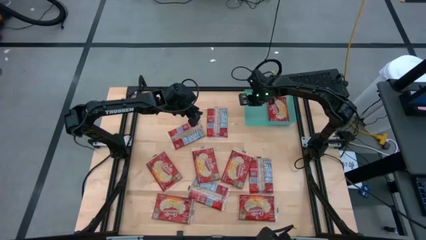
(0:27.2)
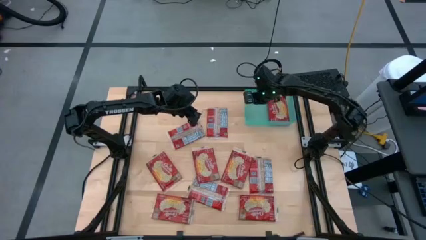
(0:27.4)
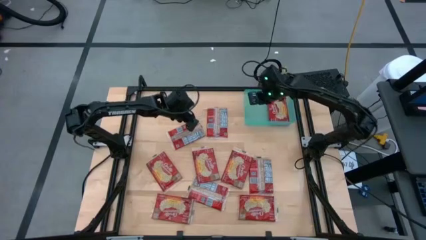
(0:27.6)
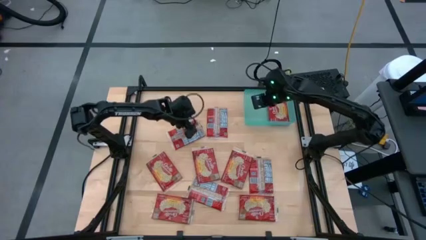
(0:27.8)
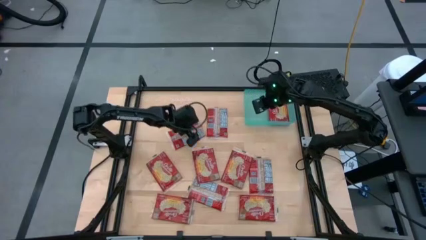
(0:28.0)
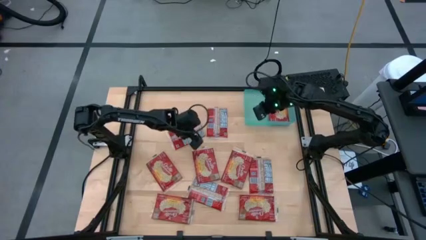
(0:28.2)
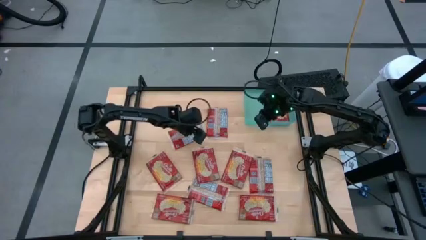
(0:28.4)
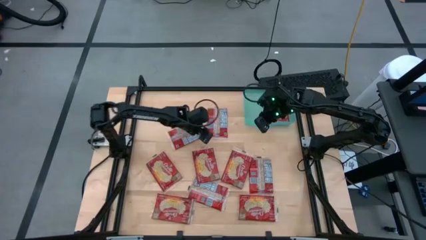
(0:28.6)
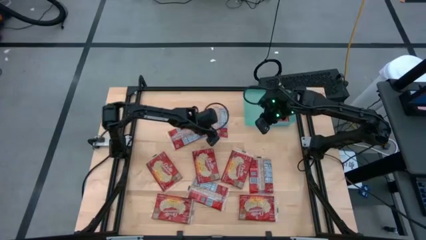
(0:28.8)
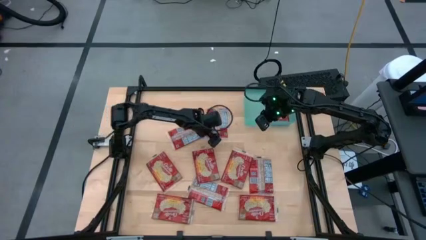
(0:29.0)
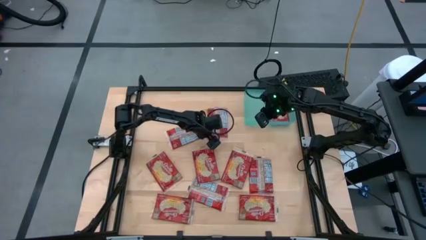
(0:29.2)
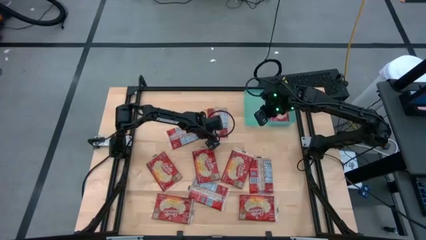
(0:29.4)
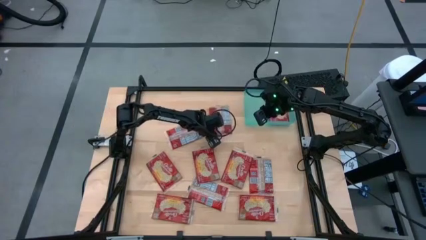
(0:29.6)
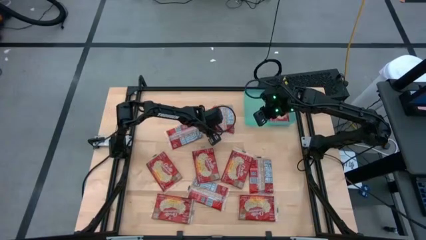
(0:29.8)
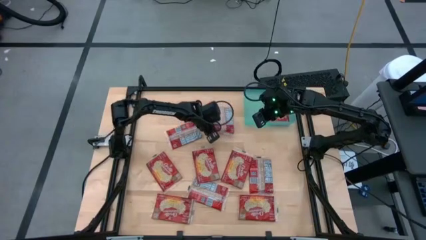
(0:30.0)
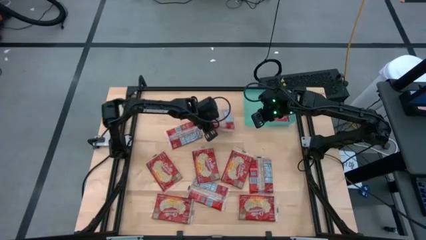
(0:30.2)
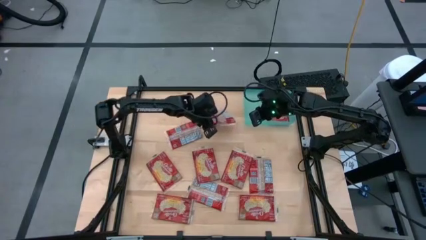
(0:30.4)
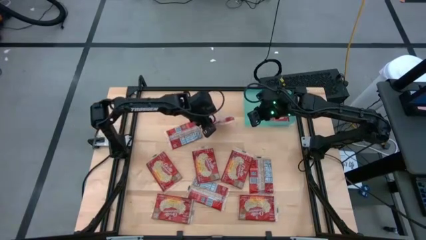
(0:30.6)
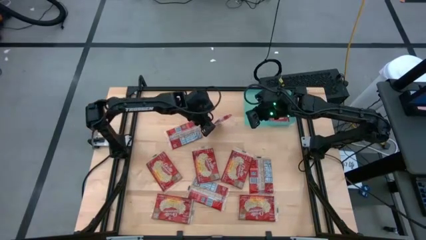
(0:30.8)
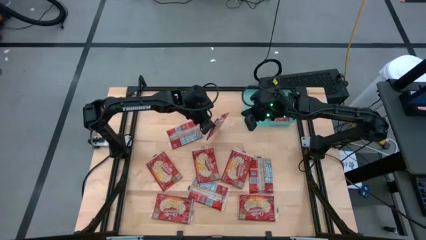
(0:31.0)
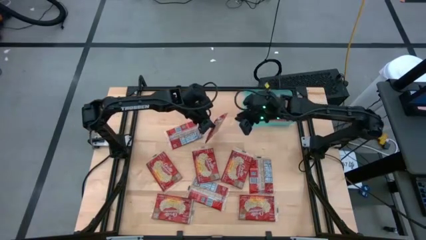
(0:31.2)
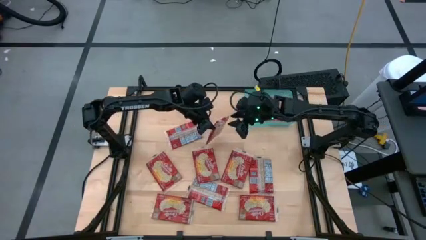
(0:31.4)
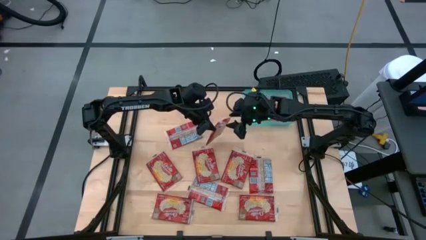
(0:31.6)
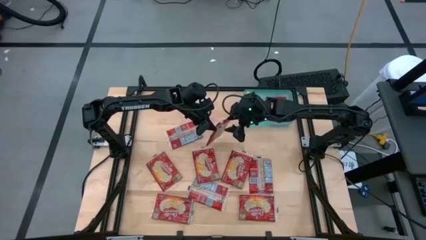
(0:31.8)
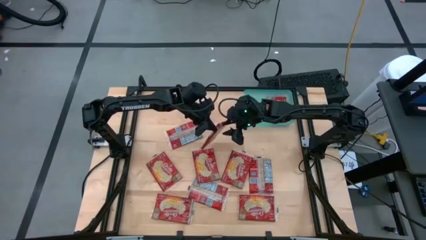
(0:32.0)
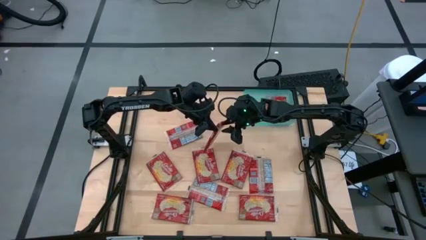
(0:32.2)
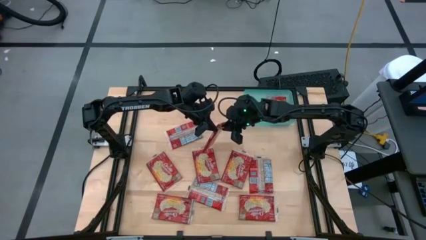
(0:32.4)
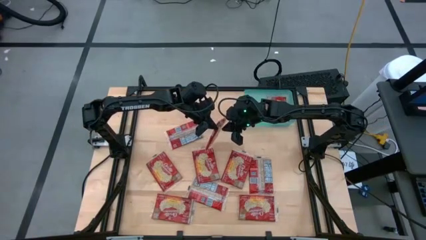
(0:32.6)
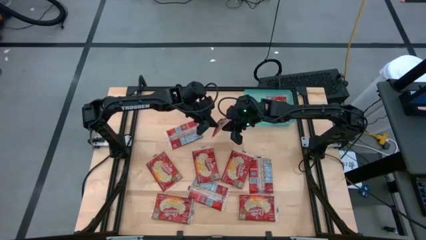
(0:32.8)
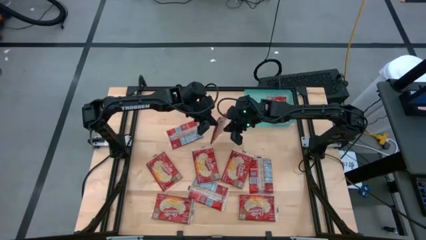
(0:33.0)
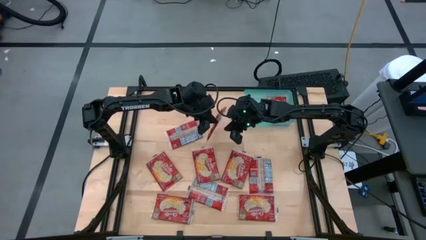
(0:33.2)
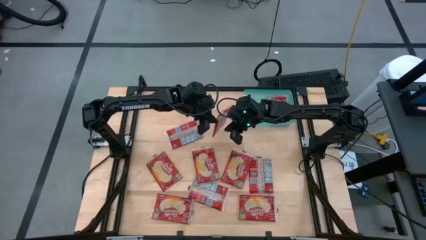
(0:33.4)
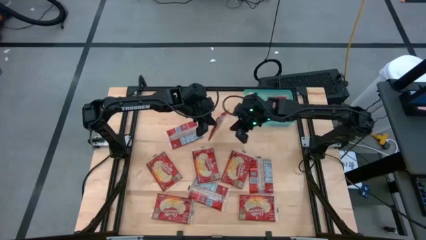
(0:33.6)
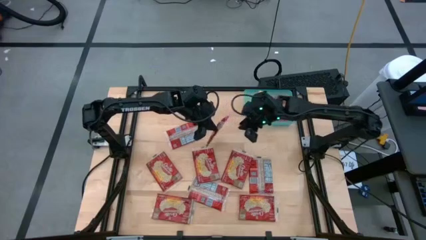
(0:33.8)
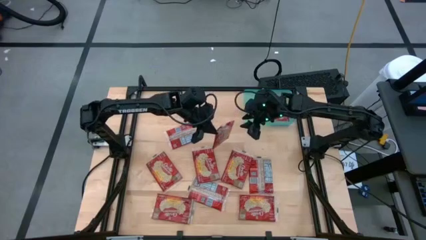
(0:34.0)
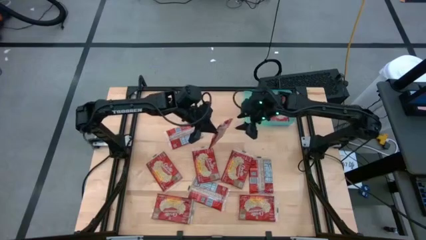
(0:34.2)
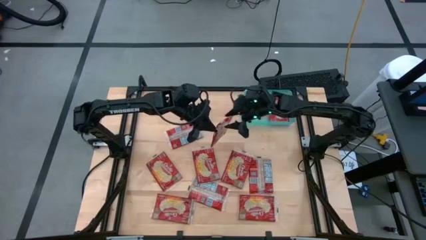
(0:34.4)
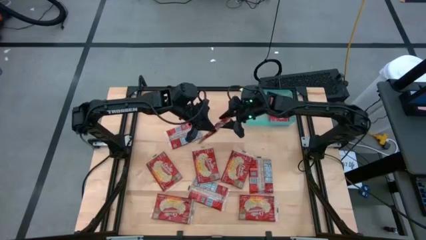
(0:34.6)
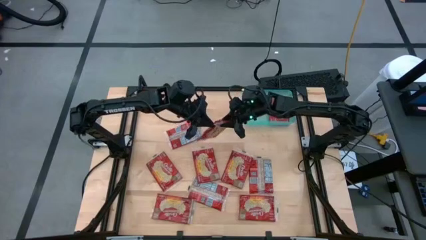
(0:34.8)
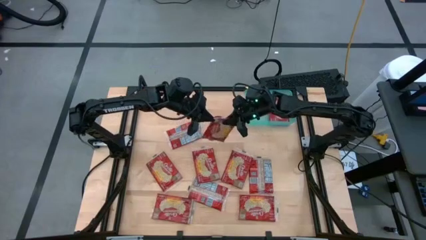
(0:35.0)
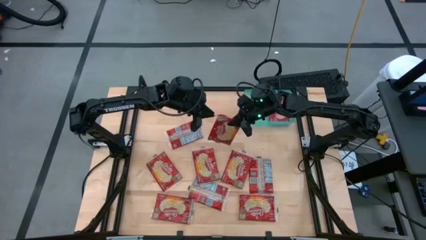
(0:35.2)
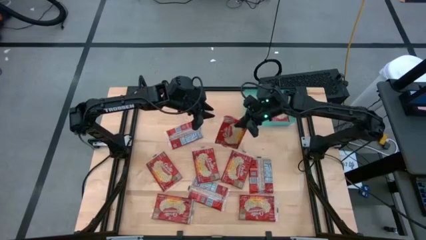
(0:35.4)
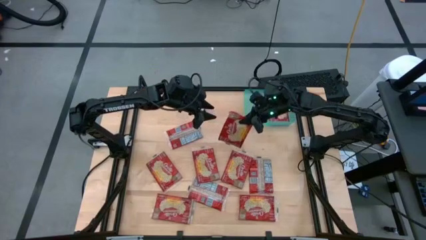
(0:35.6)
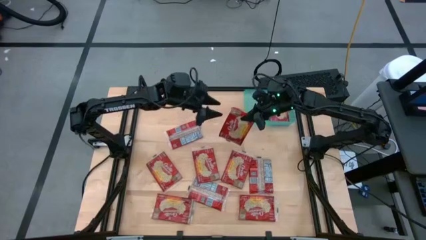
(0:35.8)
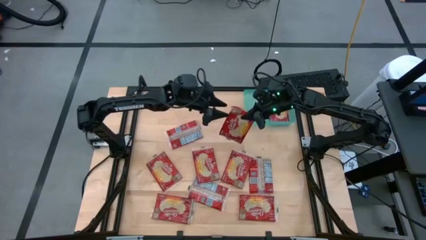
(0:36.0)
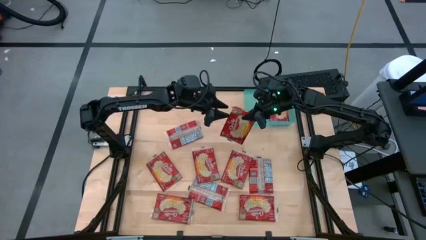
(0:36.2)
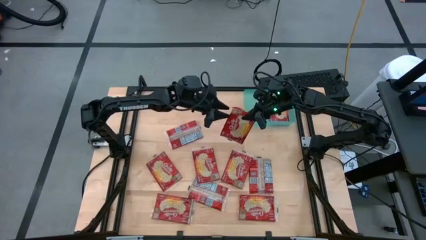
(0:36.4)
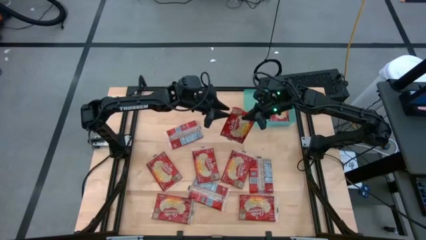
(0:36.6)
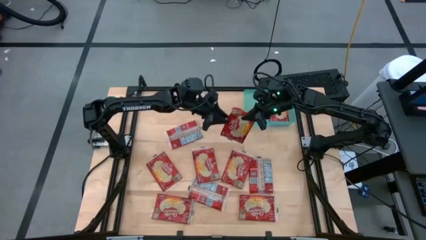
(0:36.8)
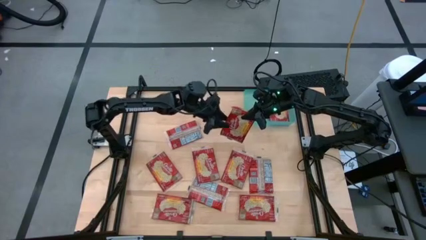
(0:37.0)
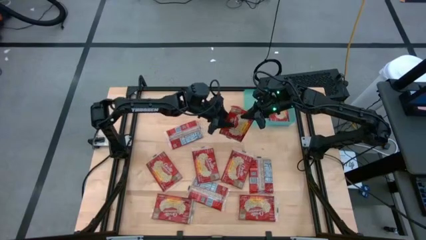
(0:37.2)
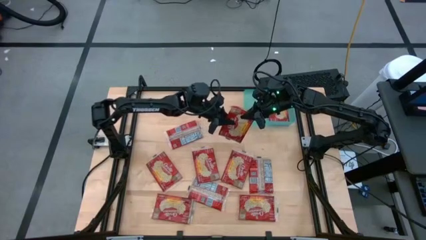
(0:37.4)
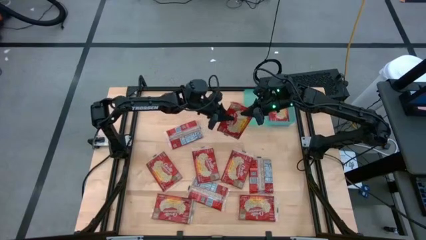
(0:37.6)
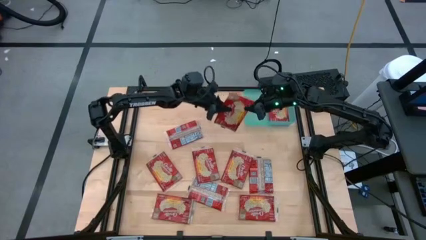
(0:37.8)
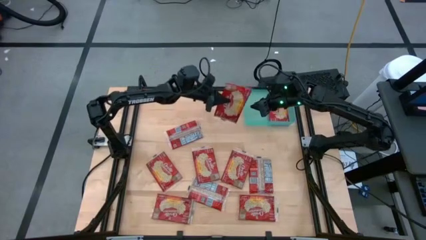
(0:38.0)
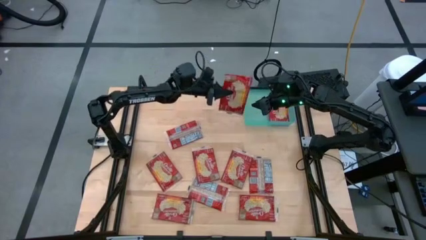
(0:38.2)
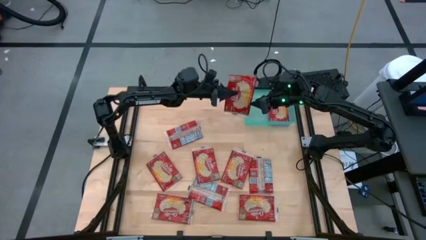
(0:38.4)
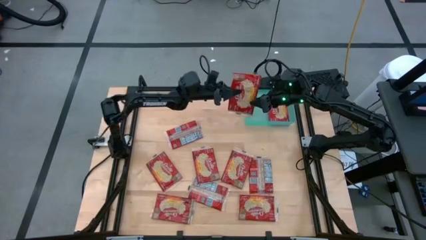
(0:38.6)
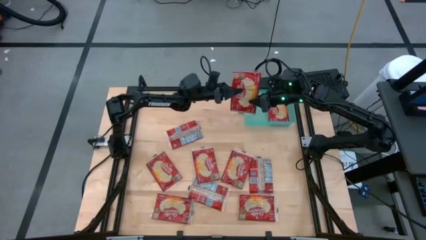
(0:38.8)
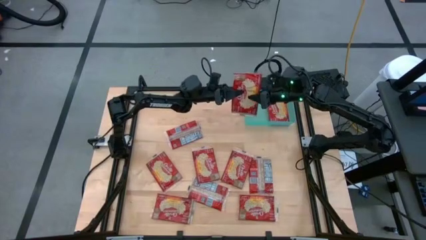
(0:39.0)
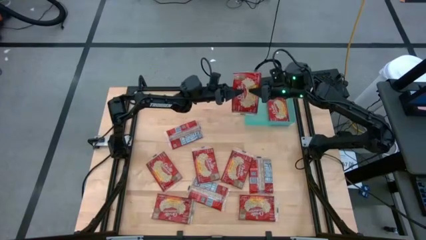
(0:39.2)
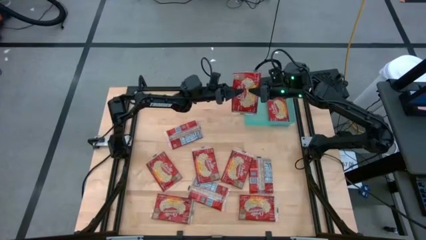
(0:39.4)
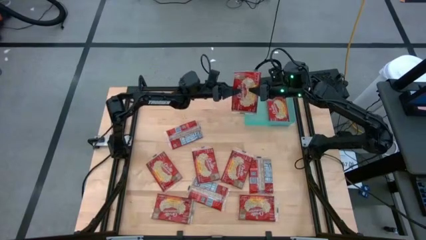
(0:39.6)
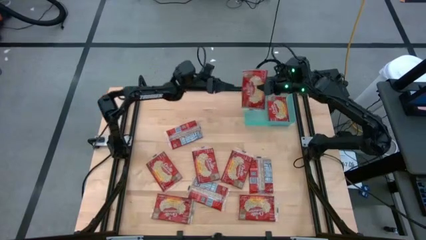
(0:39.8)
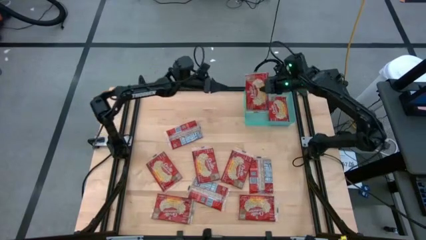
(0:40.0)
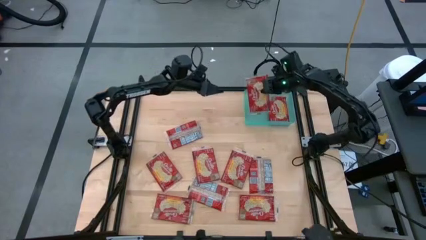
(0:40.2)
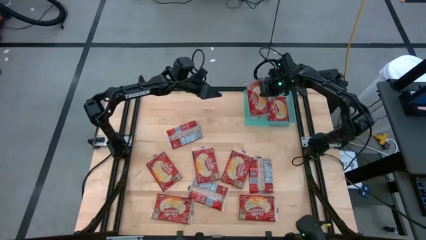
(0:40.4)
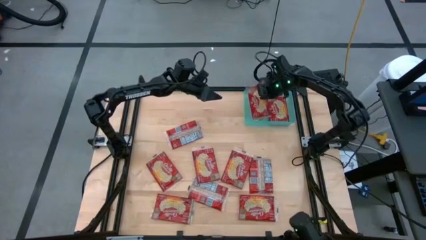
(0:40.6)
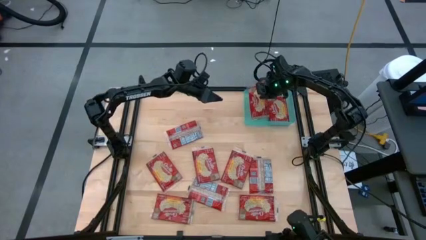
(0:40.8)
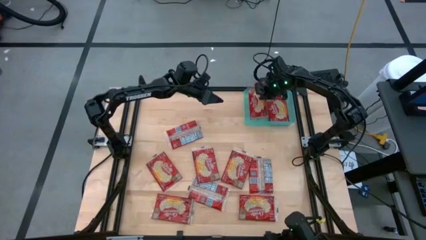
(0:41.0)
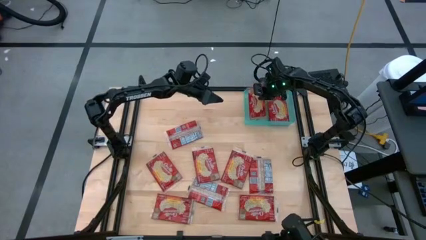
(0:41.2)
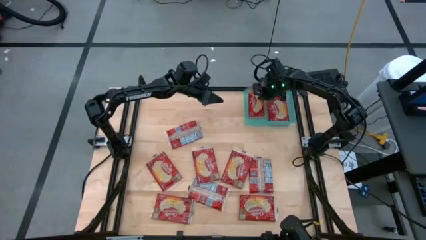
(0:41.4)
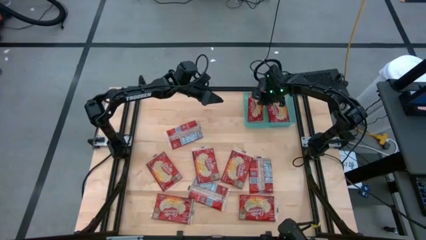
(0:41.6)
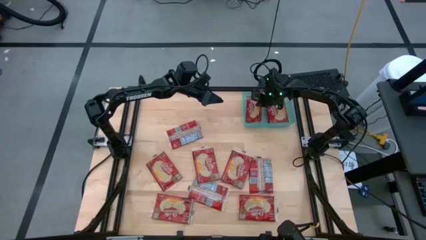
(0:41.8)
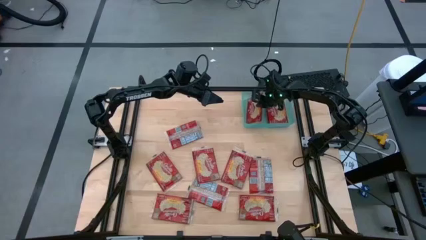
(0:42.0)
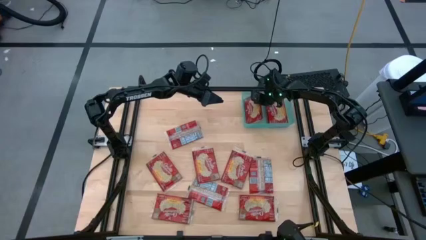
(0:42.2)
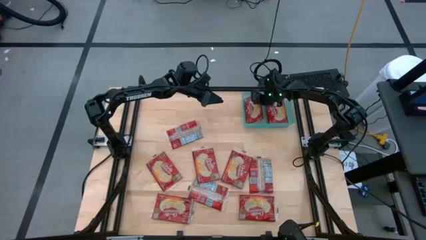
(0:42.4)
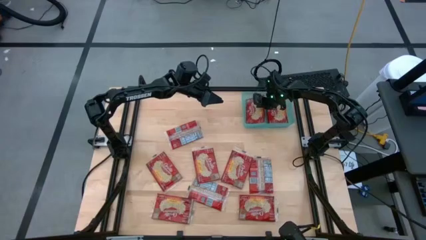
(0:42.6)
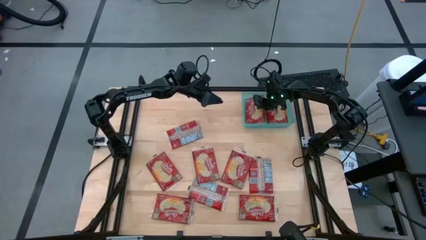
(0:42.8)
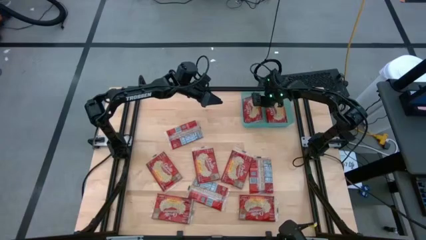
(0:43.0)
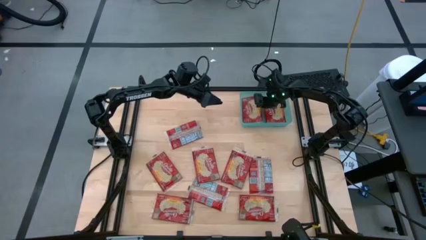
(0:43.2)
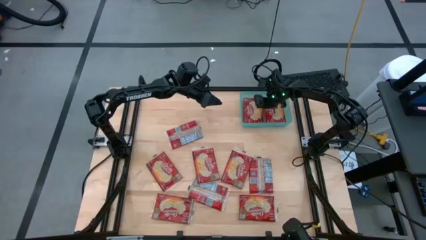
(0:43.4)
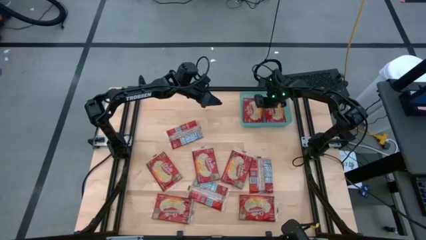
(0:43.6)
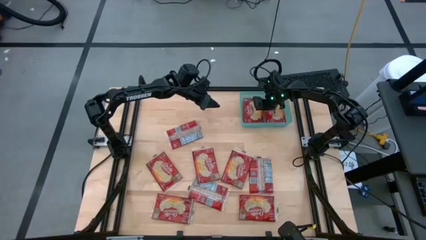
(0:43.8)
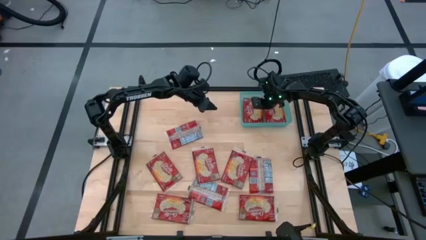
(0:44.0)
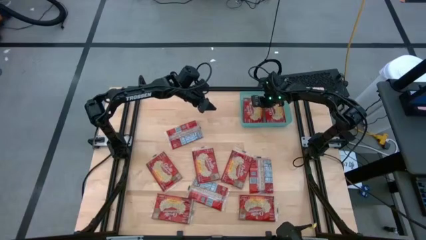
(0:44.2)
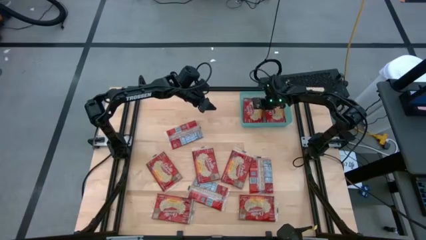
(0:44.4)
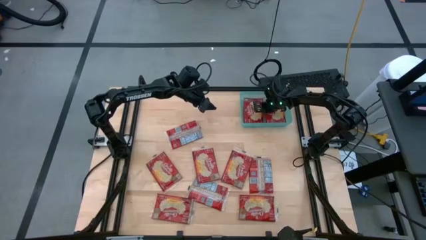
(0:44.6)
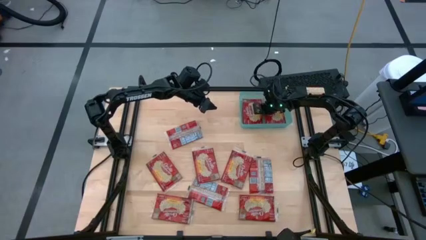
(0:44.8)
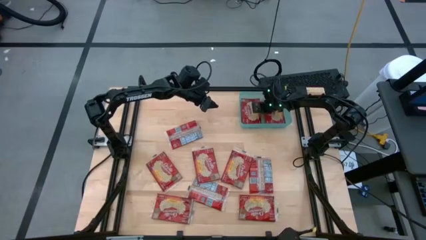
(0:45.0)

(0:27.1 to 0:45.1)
Task: Sort popcorn bags into baskets
Put the red popcorn bag into the light blue bin
